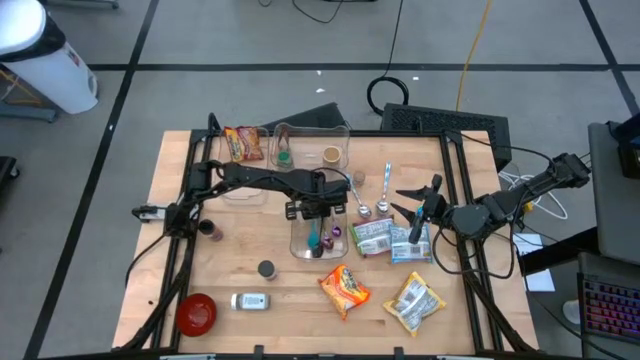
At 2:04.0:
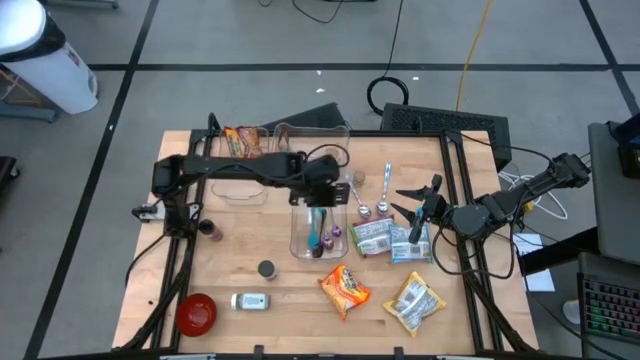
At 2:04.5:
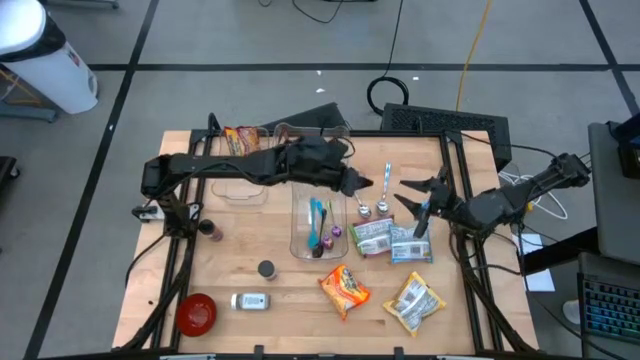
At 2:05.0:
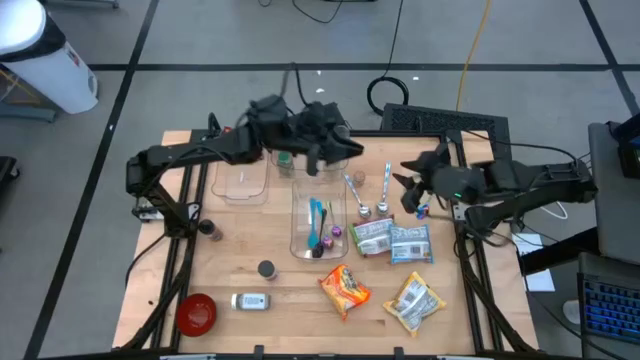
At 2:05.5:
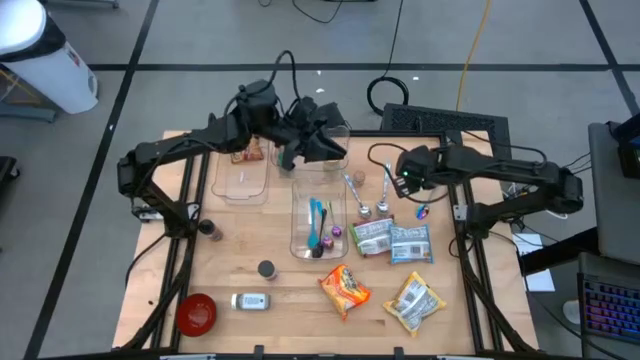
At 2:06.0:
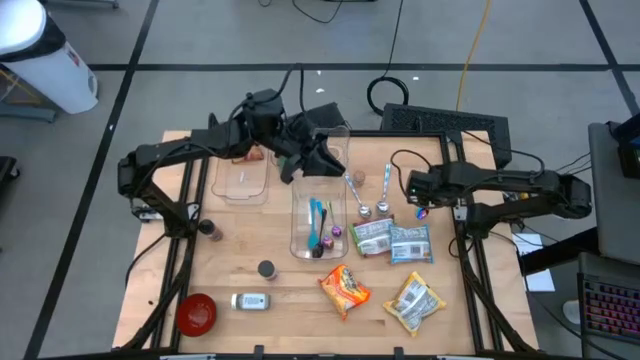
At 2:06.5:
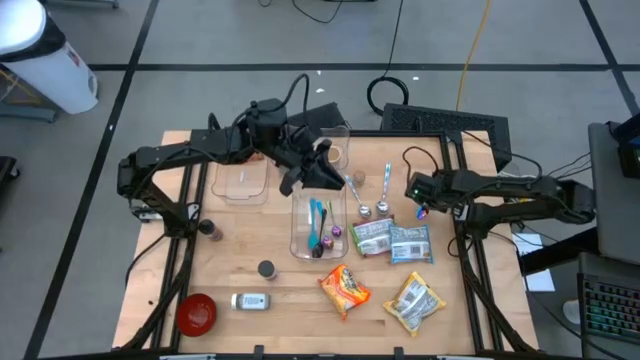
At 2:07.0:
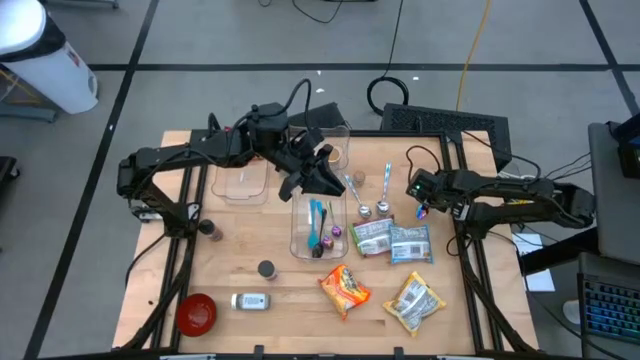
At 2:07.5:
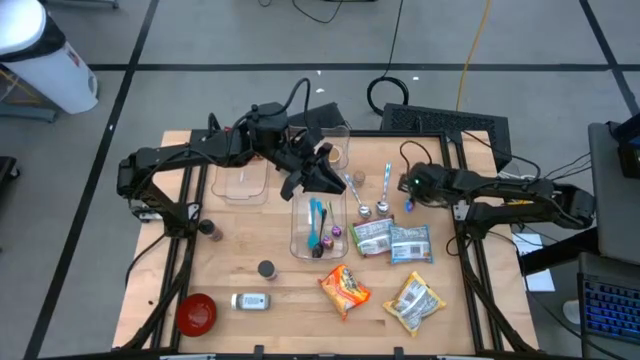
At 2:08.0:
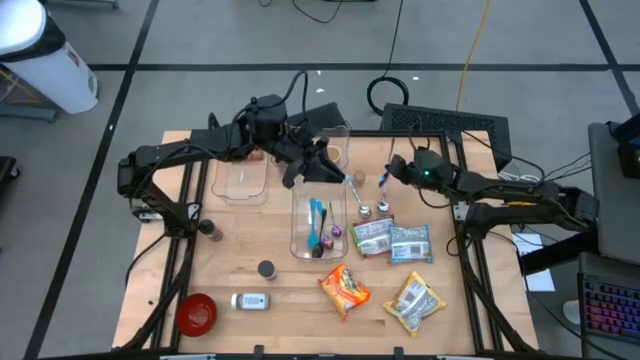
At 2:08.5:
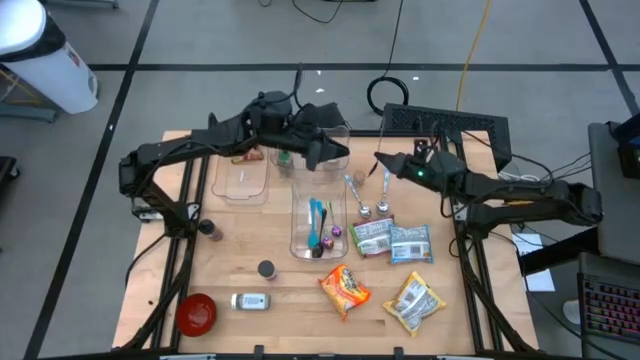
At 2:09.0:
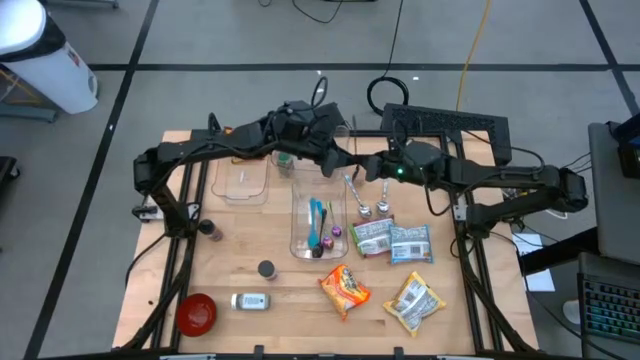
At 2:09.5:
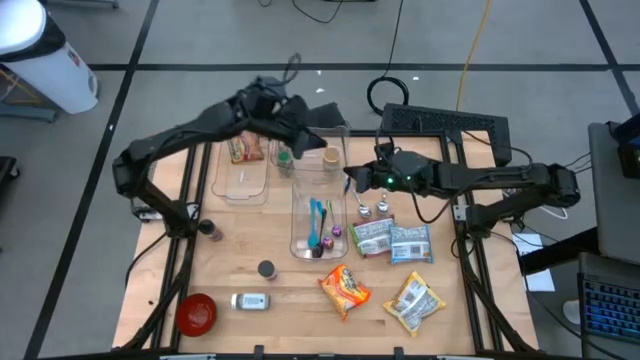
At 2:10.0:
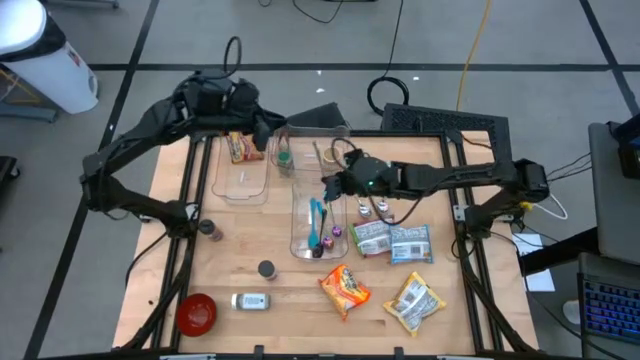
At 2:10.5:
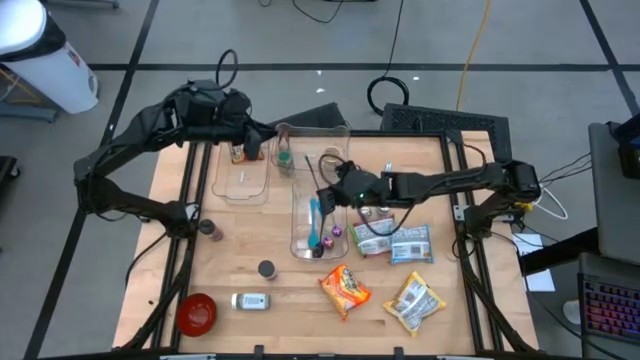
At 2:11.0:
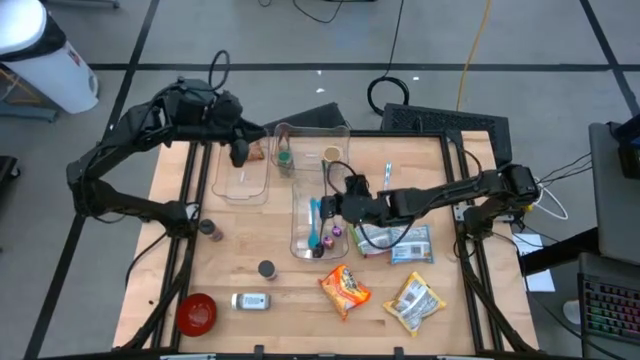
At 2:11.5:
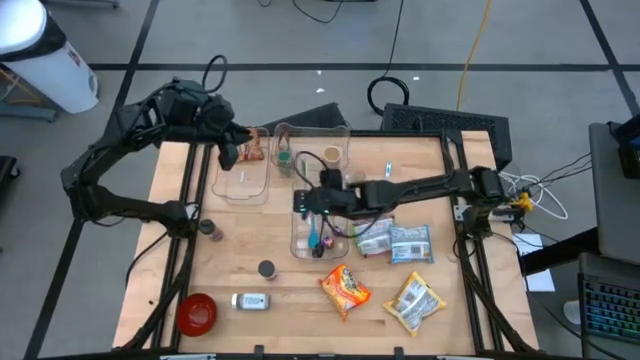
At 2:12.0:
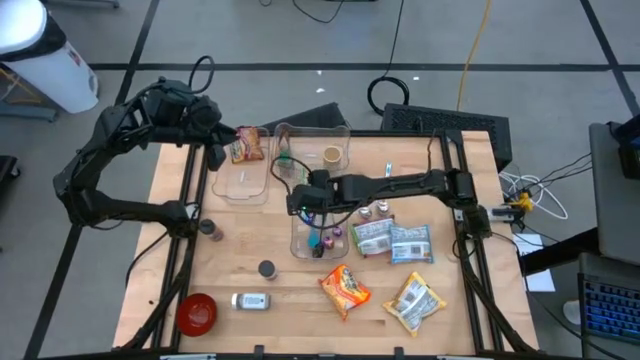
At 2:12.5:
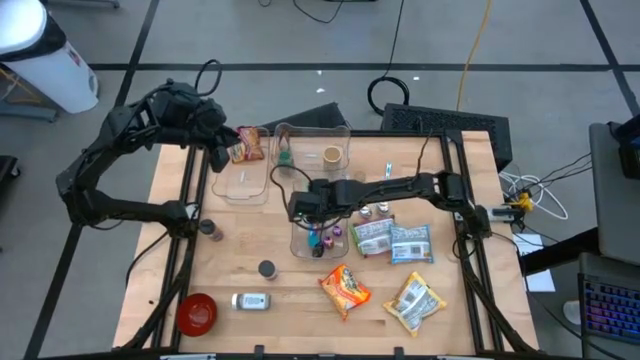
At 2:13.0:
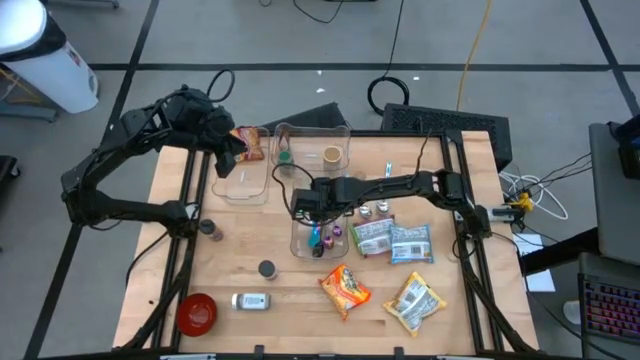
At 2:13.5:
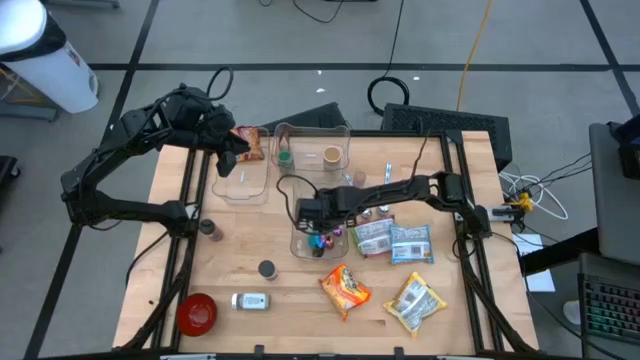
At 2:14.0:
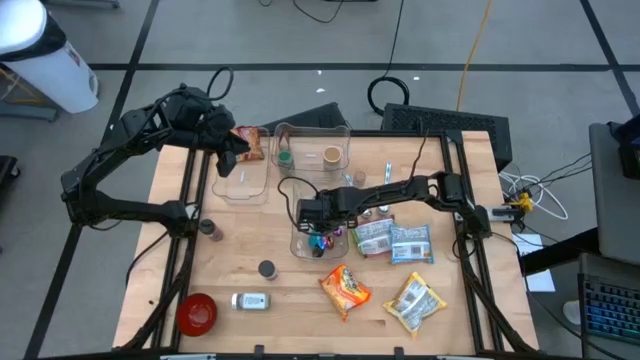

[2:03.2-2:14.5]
Task: Pick & Place Food Item
Put the purple spoon into the bottom right transparent bin

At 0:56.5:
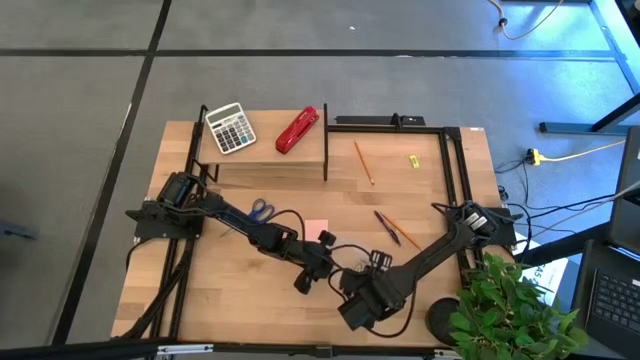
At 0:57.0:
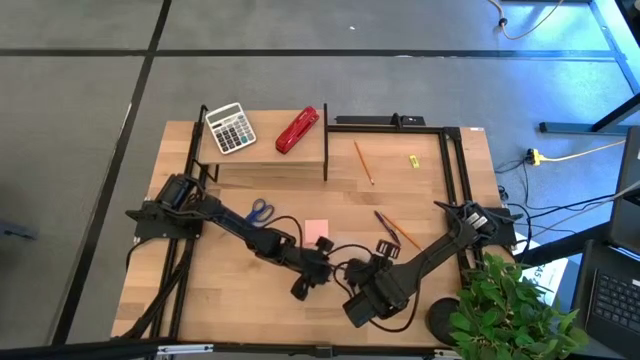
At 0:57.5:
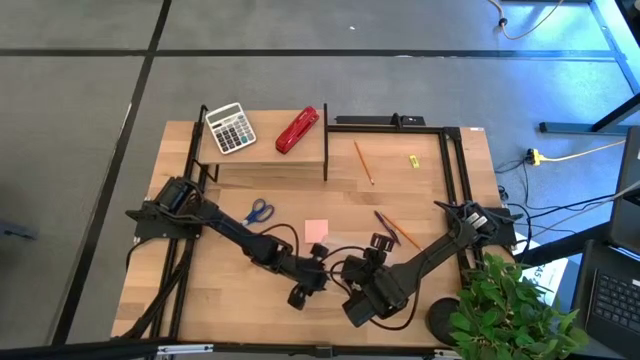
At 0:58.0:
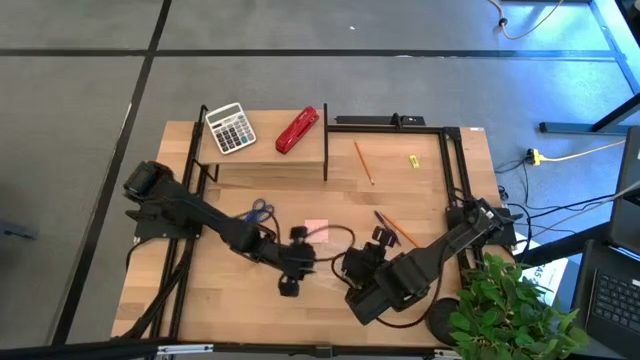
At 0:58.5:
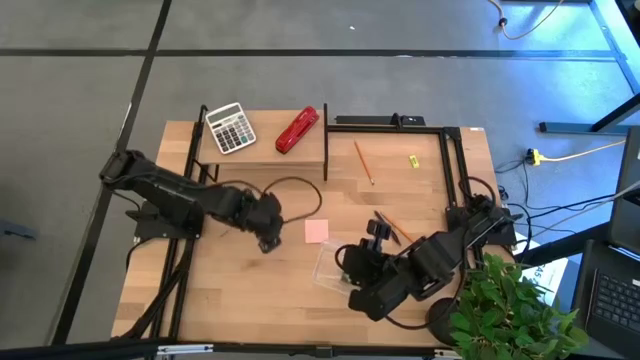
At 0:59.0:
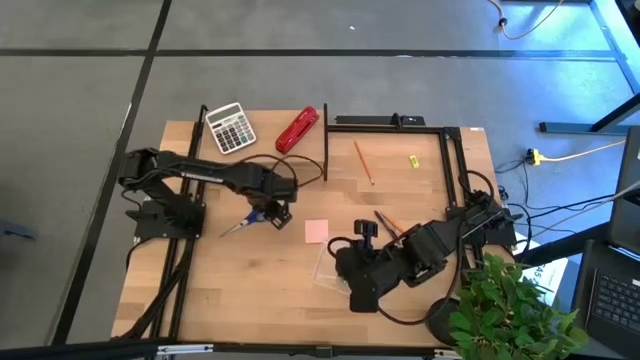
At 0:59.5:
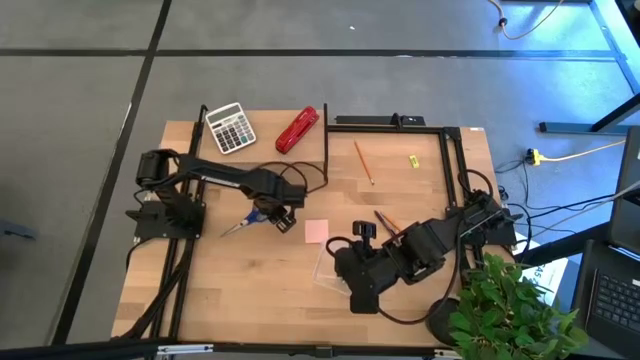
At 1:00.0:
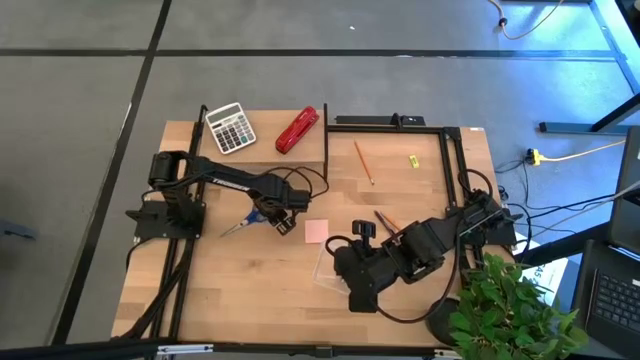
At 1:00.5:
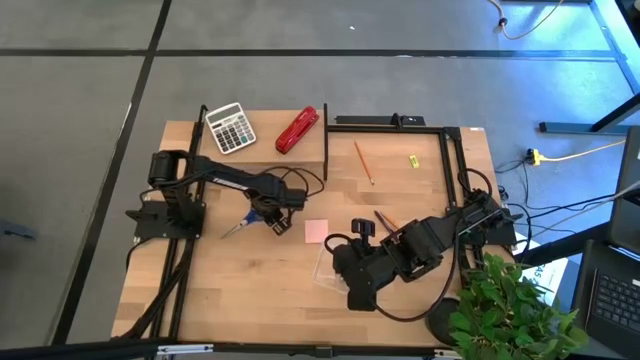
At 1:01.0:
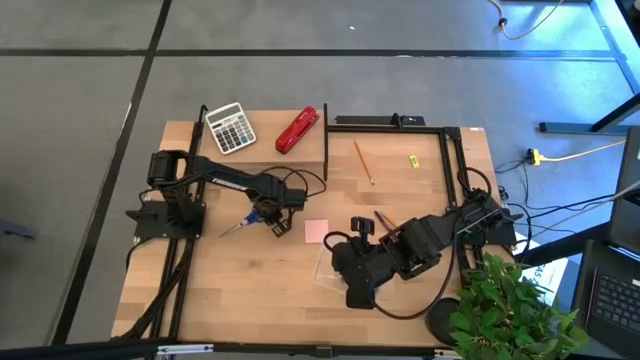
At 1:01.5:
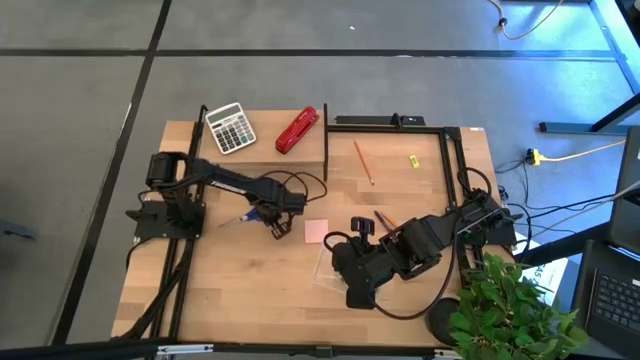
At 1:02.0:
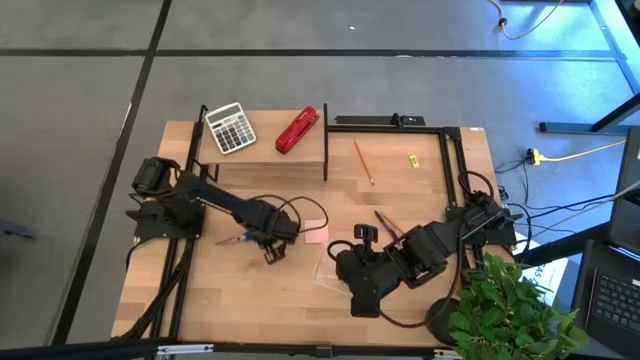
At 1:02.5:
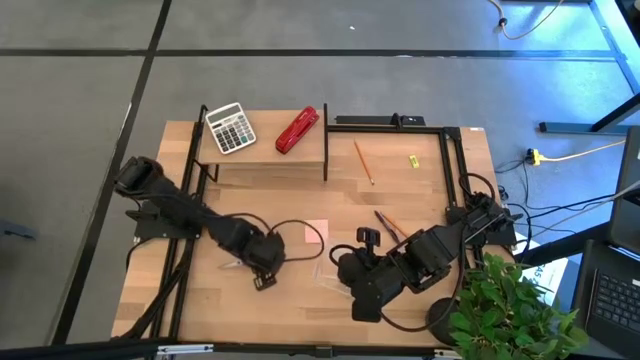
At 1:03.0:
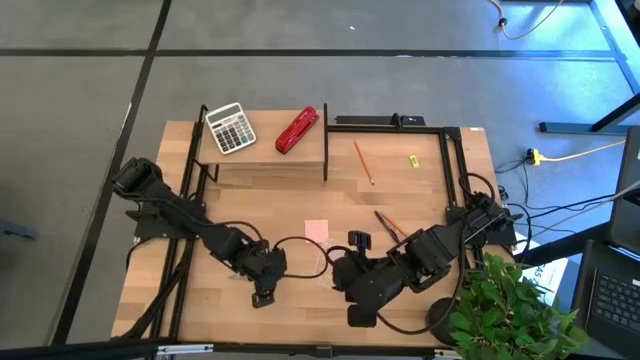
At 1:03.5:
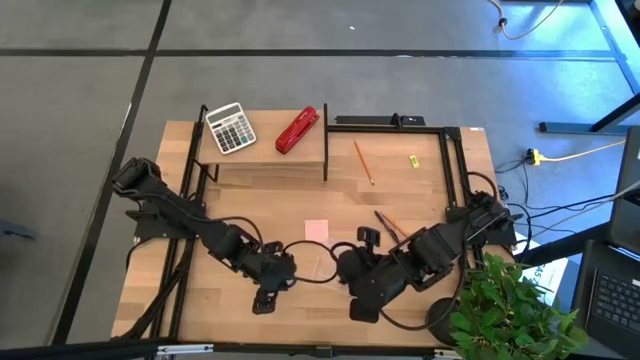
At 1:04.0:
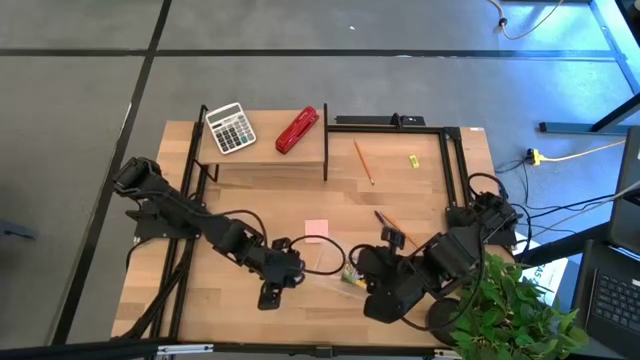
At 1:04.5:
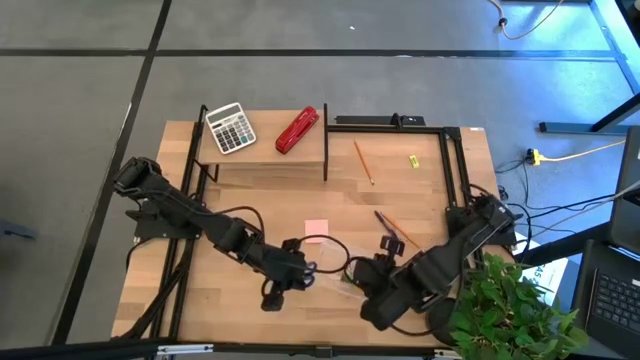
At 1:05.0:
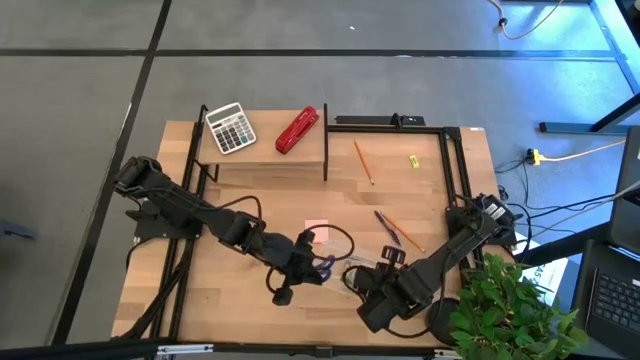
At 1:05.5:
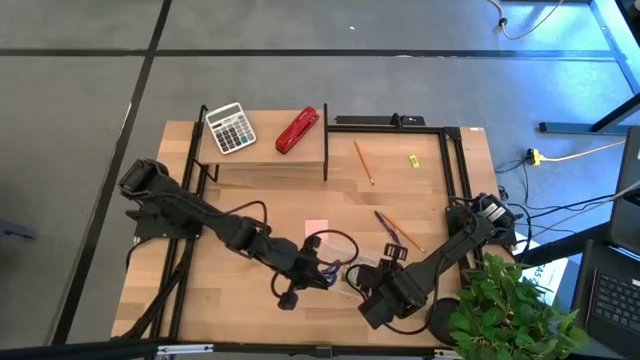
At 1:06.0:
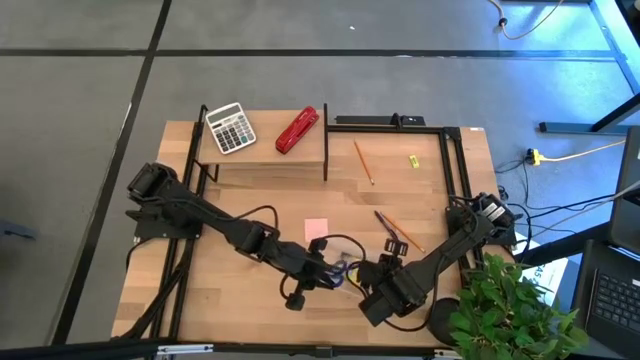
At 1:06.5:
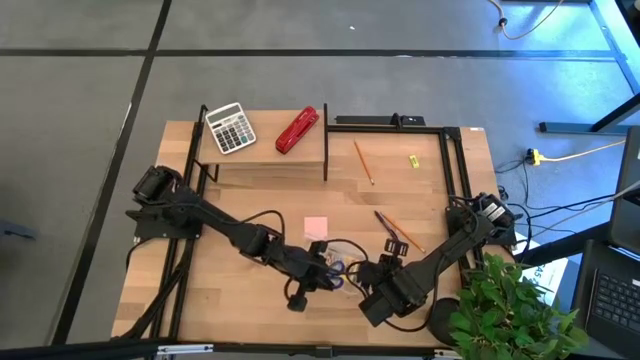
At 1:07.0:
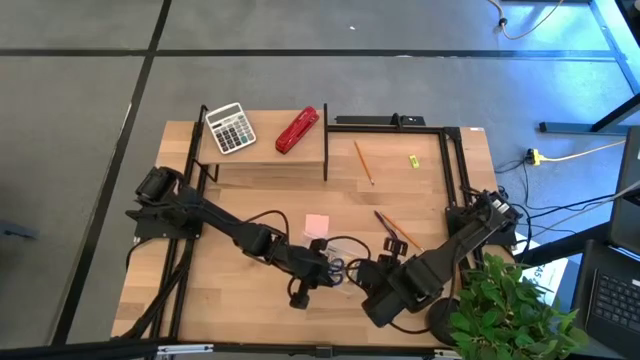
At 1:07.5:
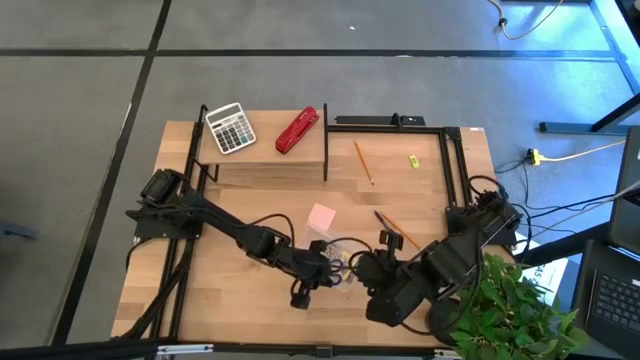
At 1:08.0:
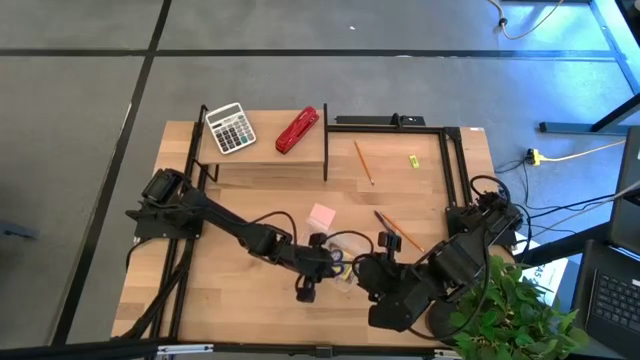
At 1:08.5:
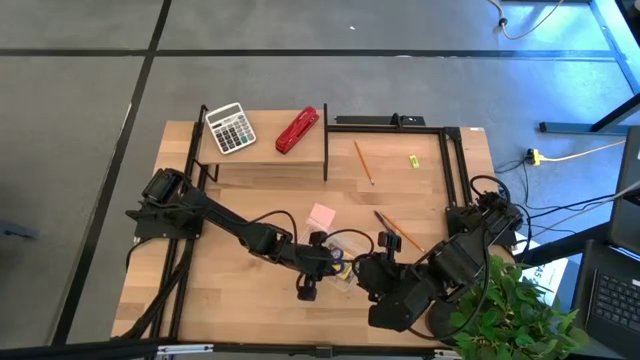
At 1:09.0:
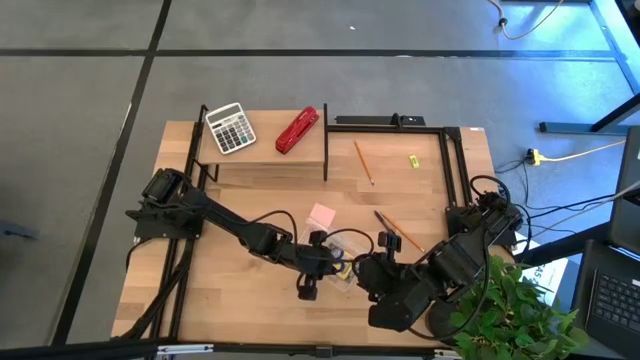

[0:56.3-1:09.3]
Task: Pack school essentials
Put the blue scissors into the transparent supply box
